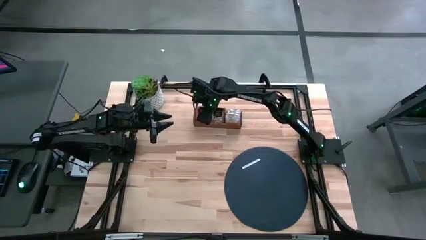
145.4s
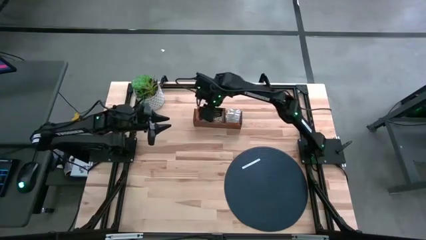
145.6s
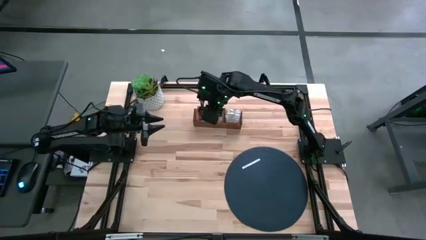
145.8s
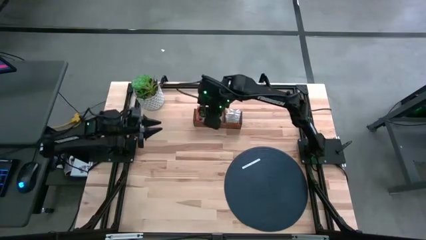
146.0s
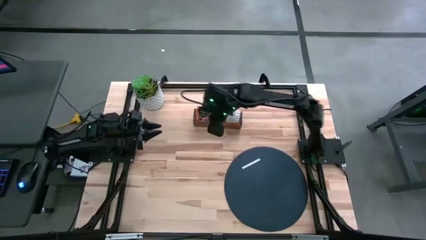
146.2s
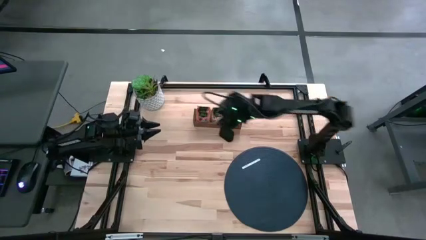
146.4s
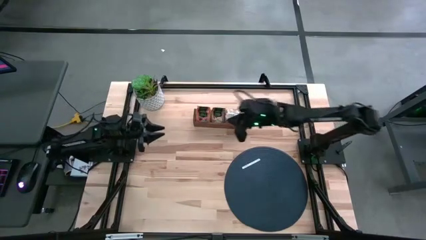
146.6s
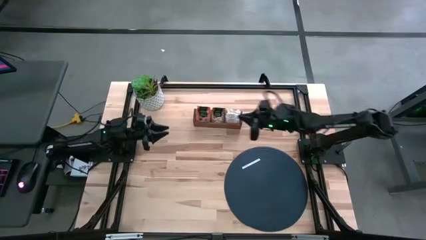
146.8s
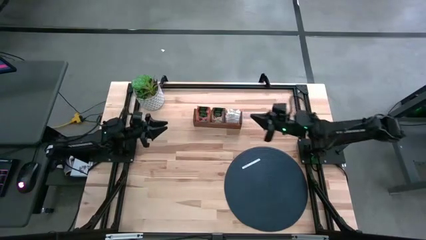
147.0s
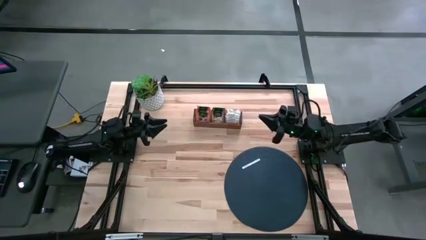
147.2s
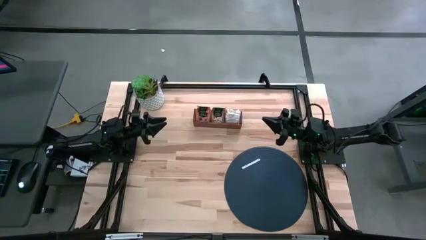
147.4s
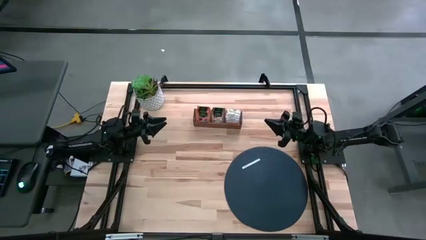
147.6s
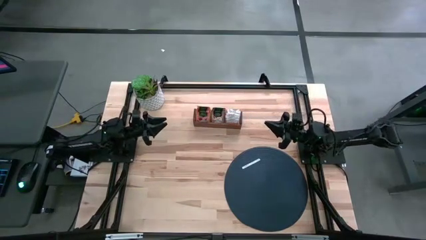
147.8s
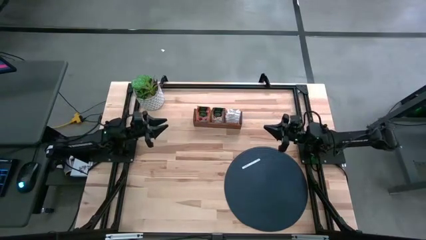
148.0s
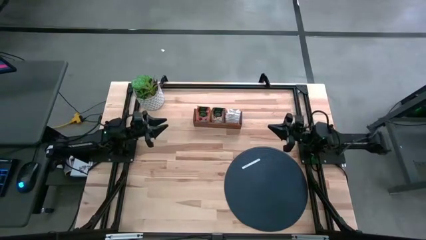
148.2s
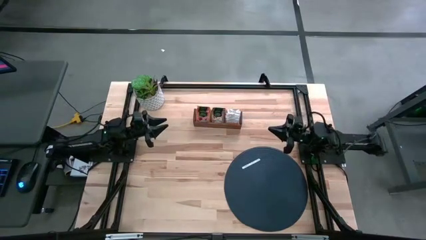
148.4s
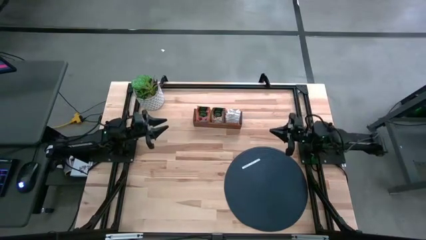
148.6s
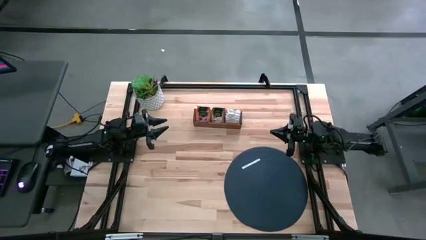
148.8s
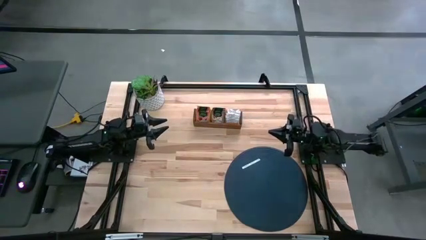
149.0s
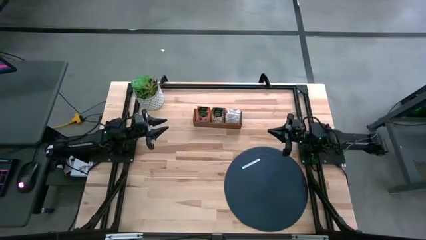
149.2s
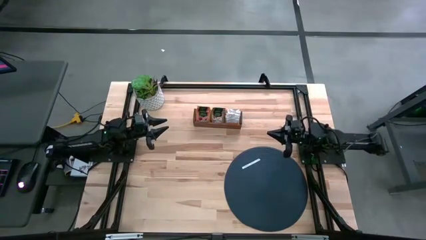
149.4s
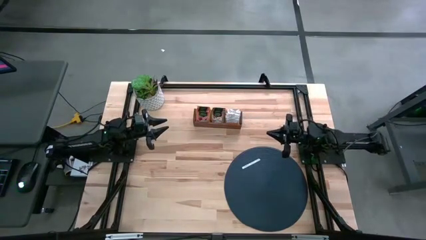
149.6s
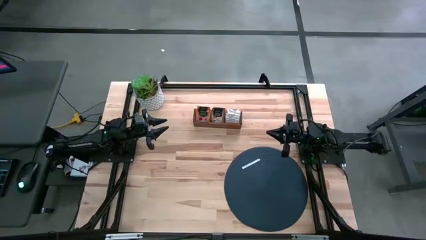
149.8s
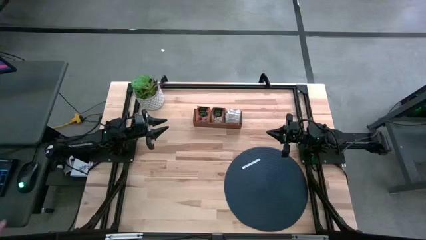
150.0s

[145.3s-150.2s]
Task: Pick & Place Tea
Return to Home Position

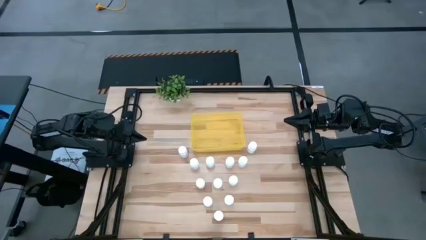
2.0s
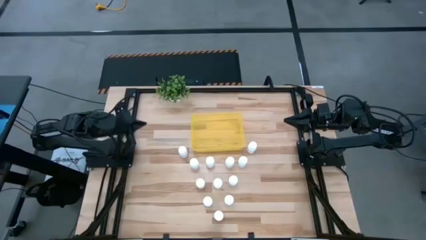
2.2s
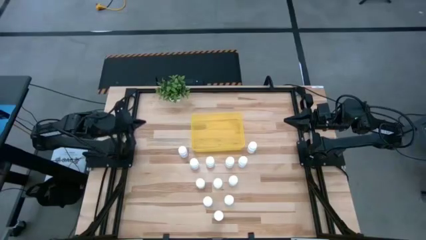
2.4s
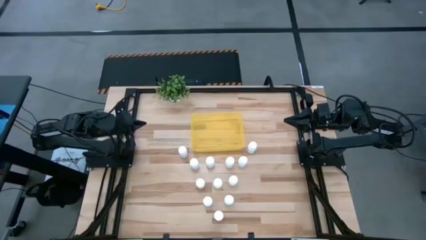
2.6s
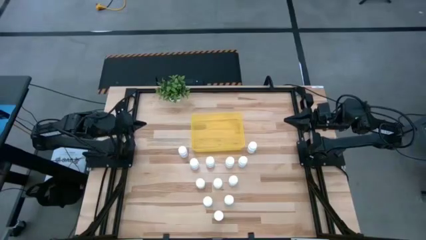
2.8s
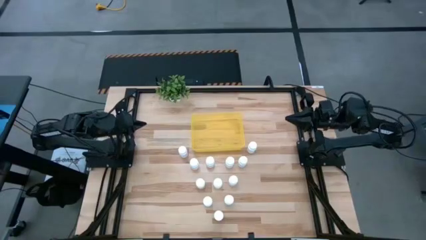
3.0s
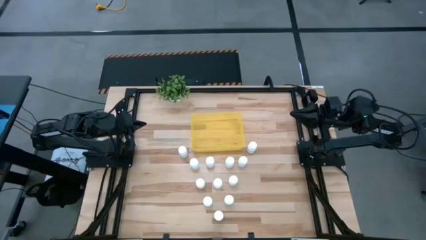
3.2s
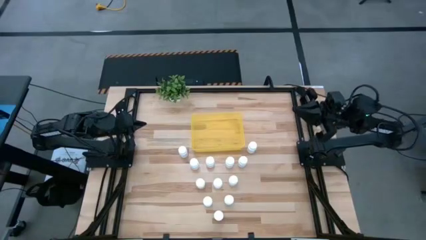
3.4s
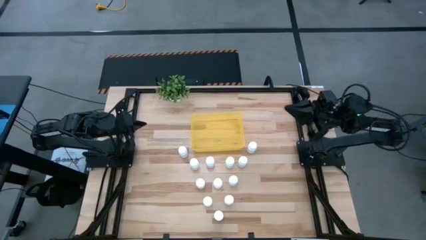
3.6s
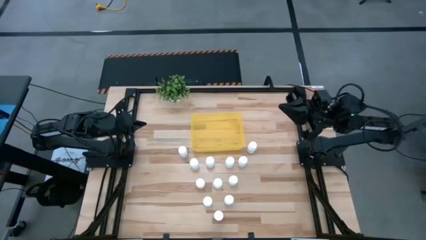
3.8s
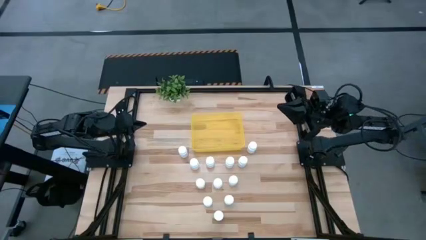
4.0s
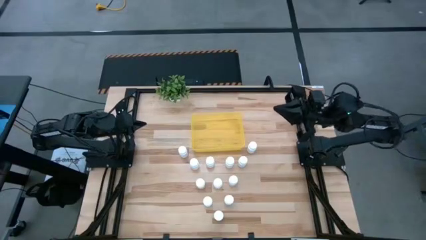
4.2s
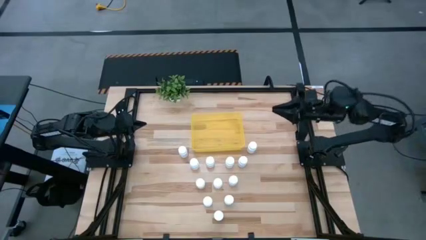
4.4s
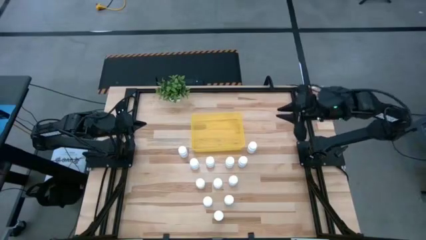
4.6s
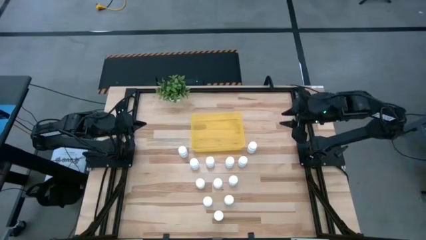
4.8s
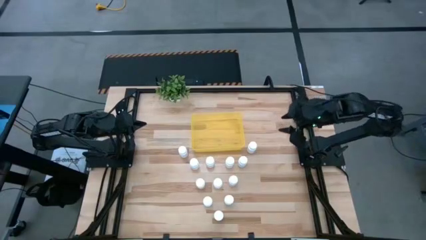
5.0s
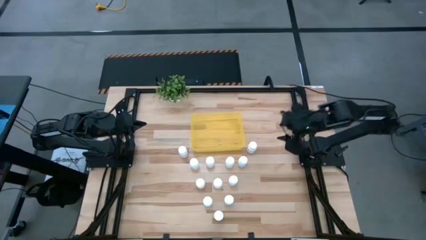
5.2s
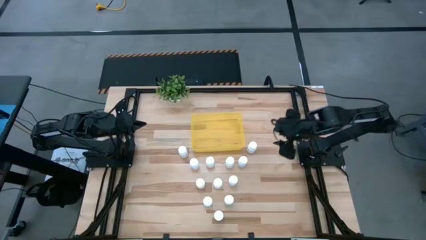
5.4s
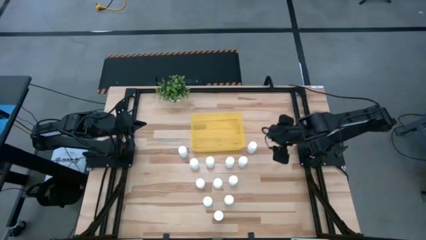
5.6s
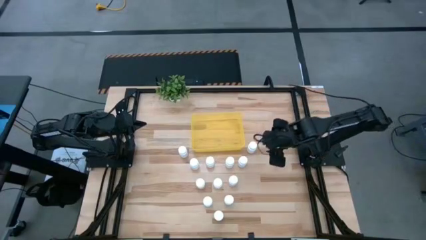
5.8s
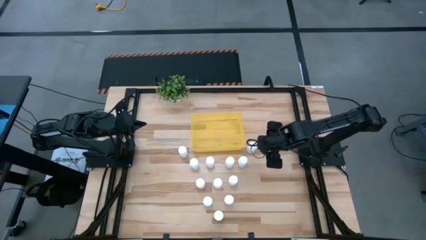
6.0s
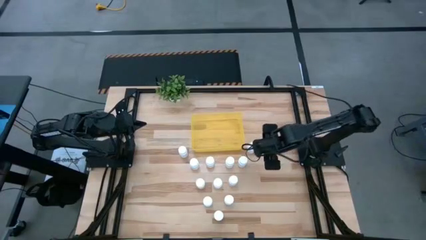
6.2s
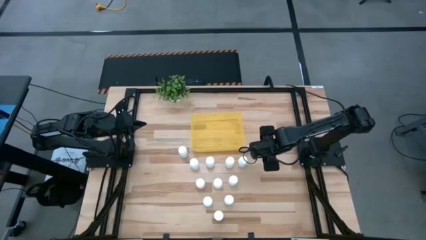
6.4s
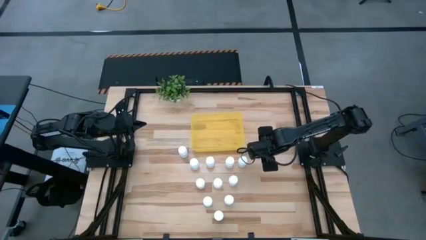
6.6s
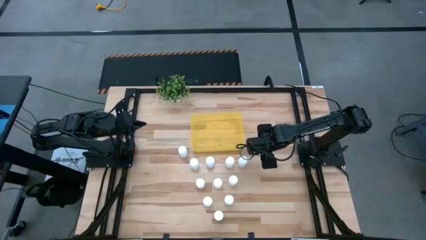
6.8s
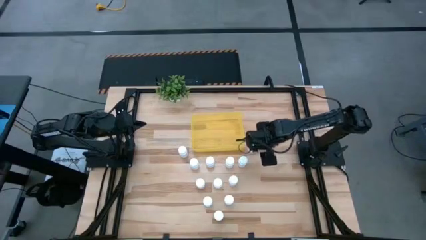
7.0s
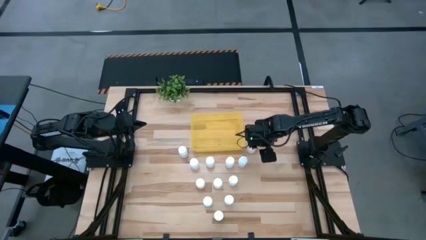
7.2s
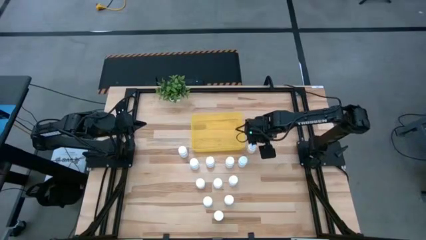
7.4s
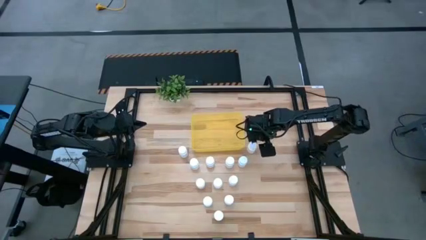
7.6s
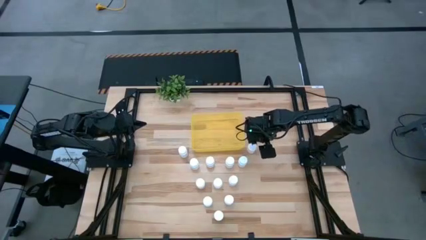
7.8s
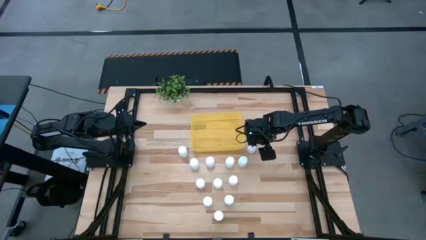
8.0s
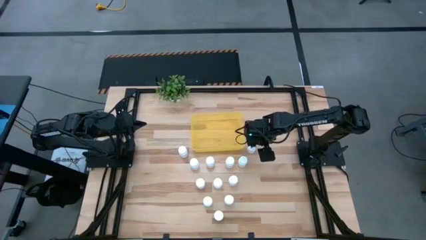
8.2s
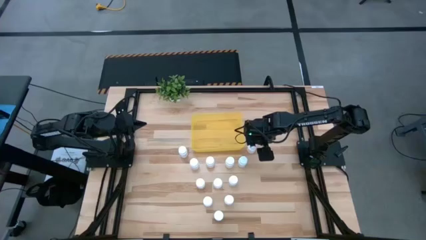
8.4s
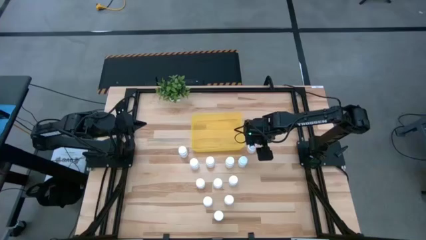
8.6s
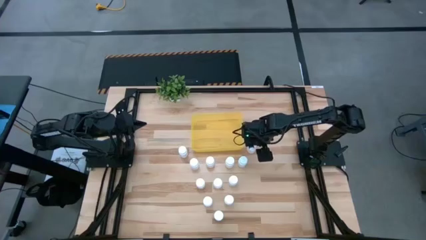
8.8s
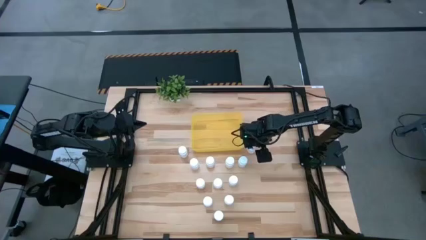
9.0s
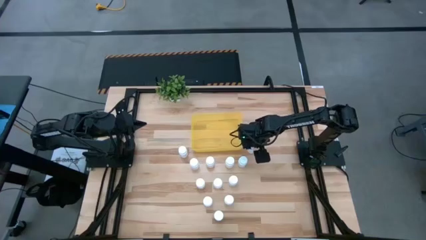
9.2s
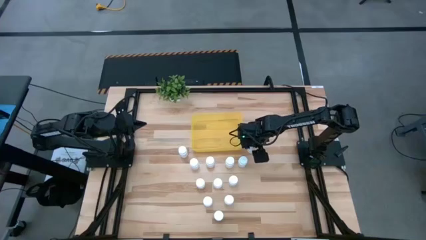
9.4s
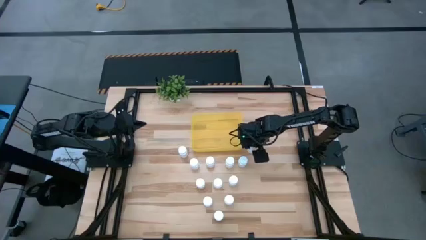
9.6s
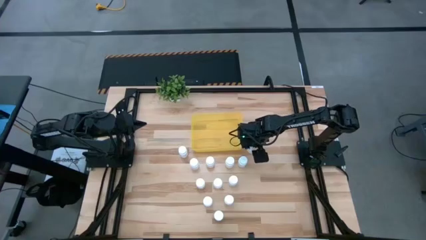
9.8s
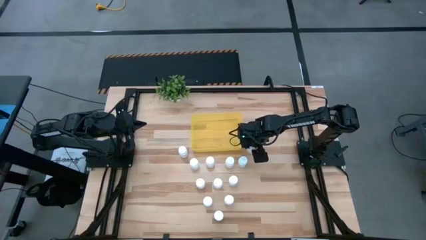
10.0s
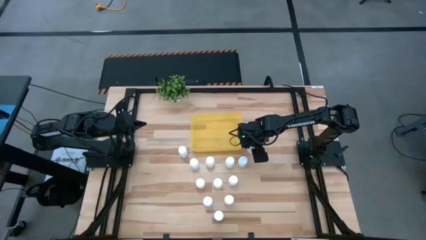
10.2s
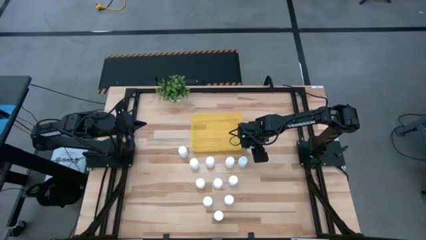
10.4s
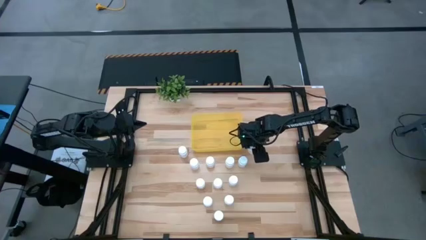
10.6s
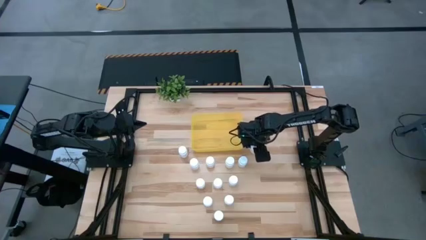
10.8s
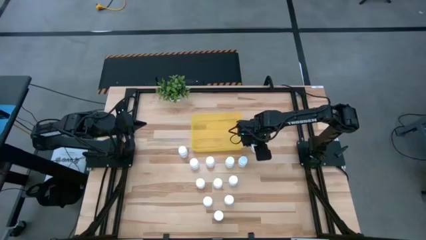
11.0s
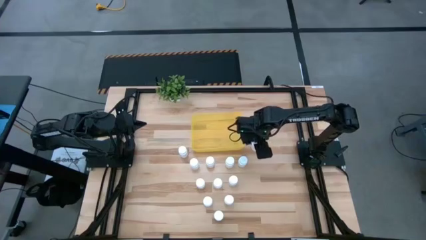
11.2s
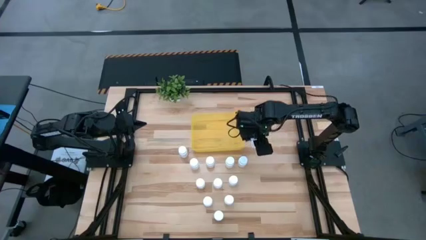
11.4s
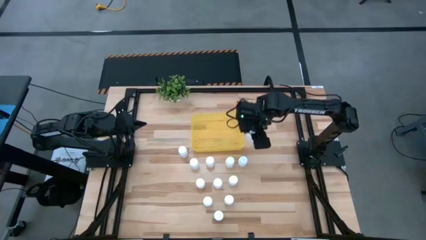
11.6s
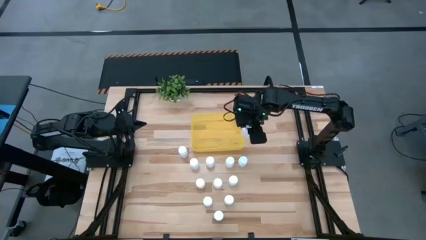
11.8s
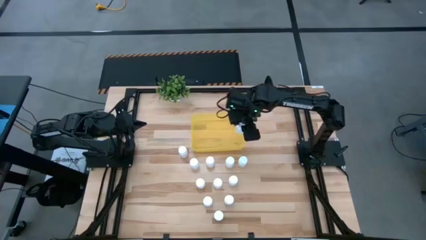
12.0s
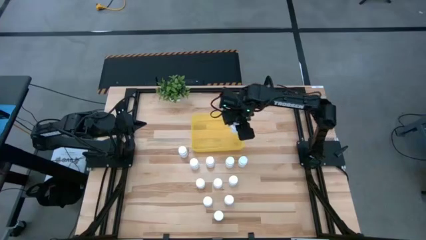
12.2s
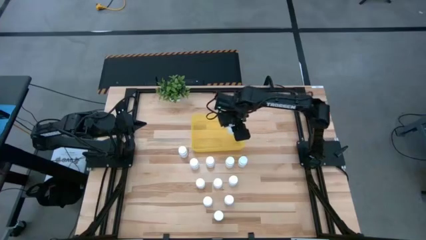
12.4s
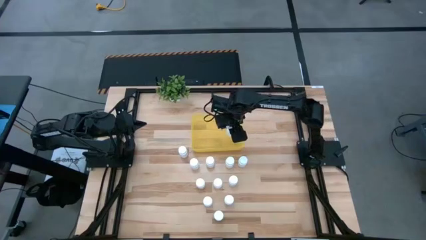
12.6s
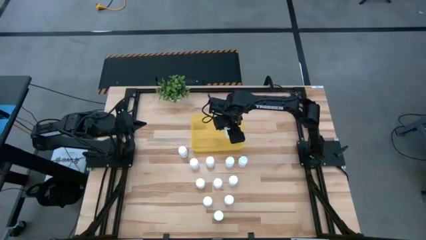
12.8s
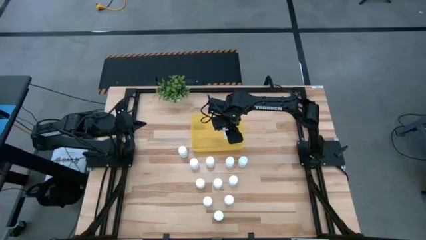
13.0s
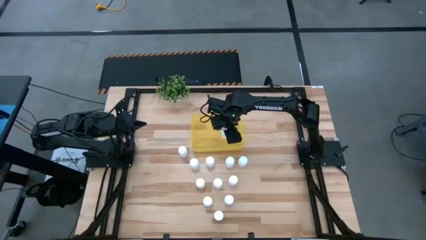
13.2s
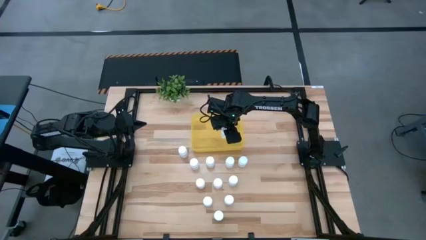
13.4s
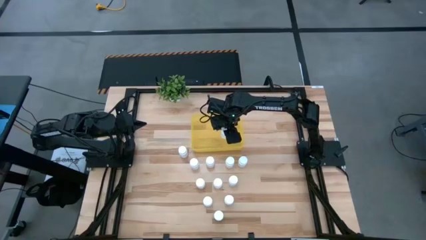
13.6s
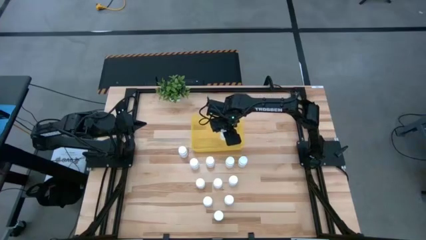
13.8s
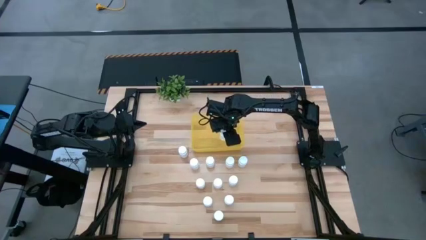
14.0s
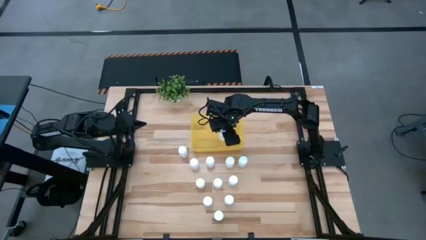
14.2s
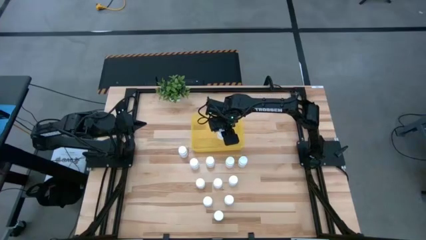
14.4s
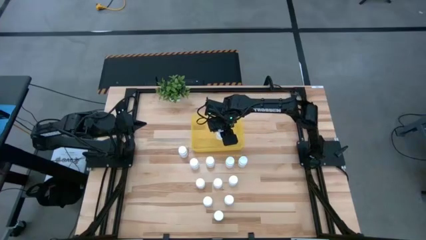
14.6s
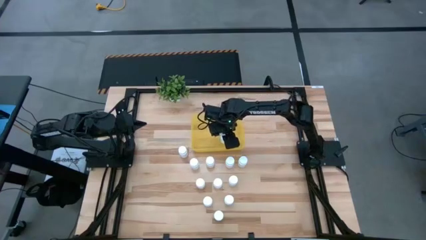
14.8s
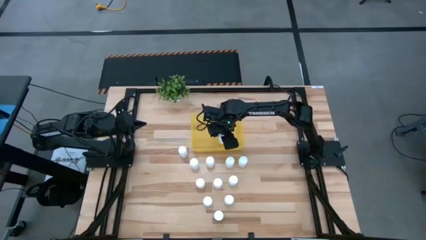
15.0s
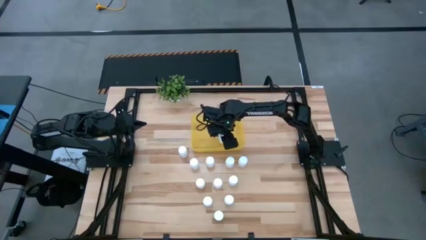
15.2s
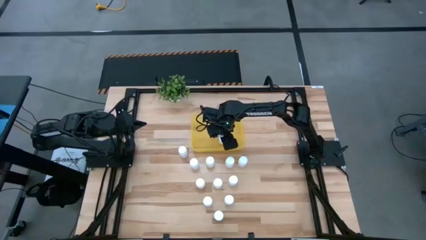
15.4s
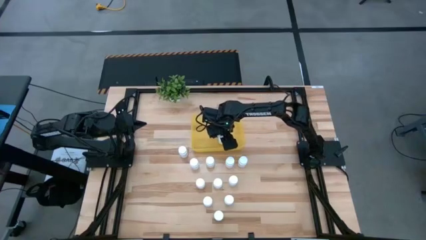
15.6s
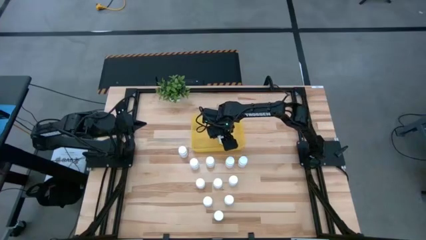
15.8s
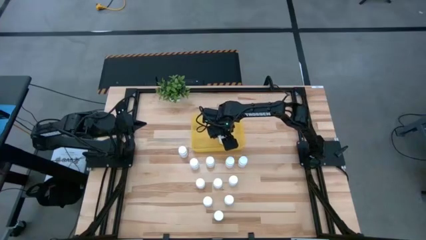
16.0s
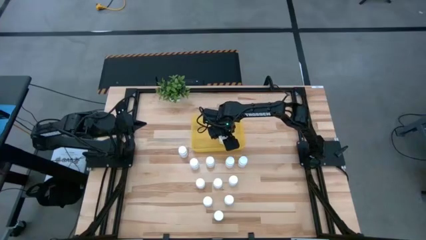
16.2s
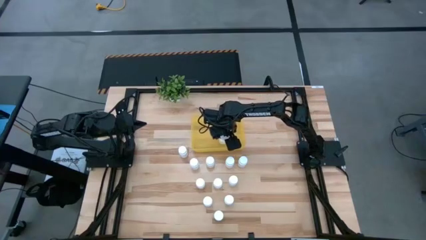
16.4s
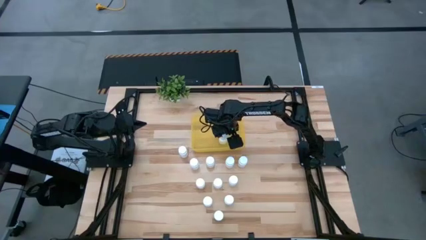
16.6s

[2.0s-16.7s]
Task: Pick and place pill bottles into a basket
Put the white medicine bottle into the yellow bin
